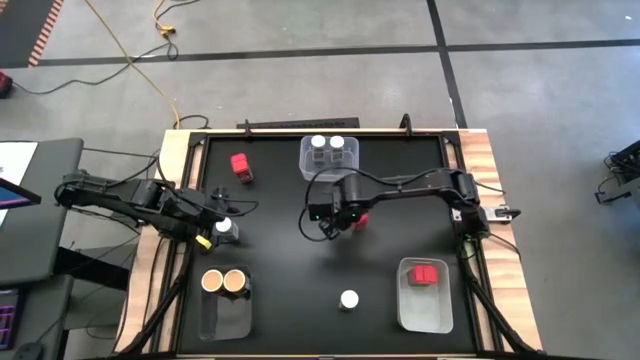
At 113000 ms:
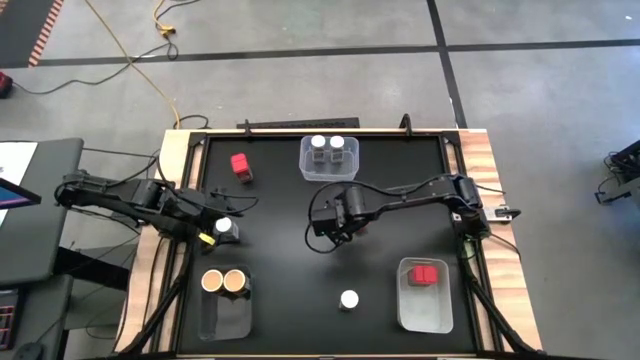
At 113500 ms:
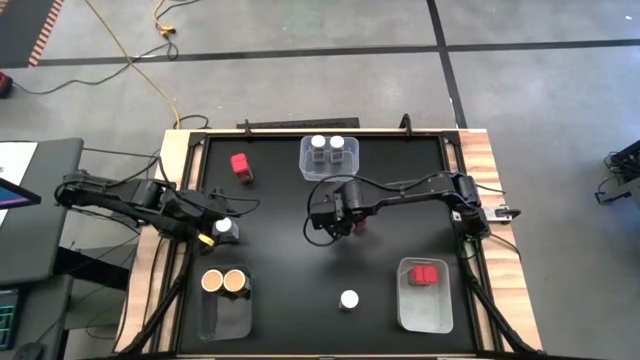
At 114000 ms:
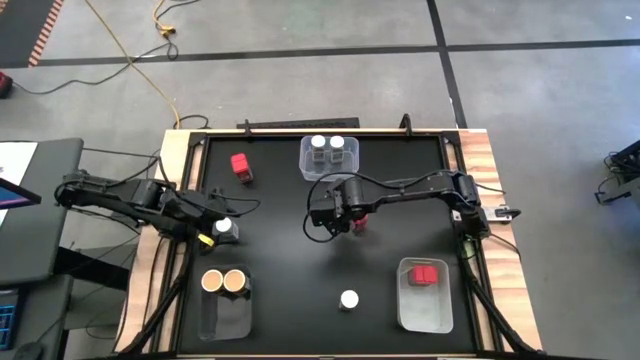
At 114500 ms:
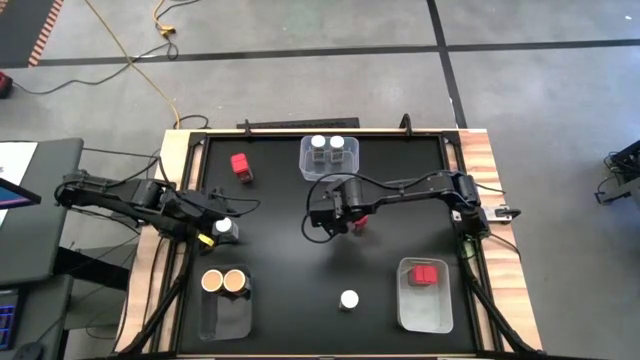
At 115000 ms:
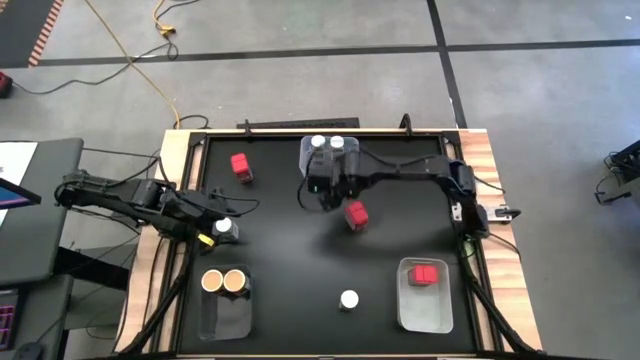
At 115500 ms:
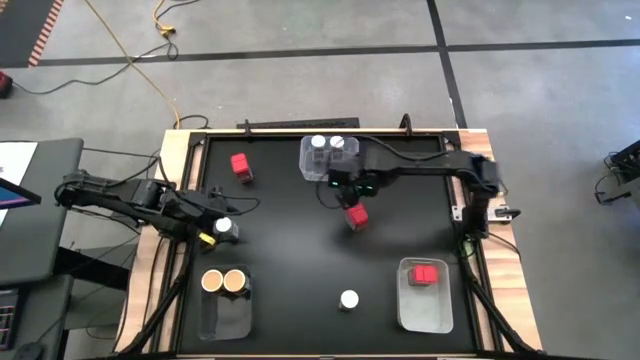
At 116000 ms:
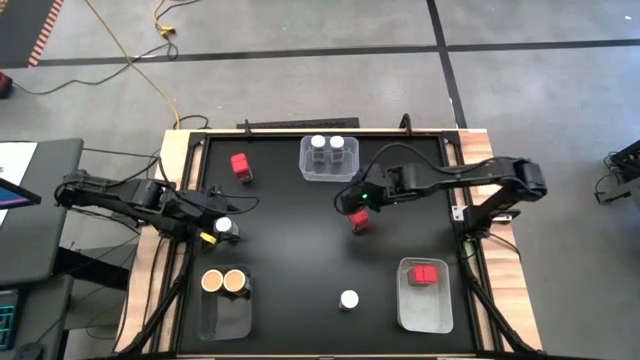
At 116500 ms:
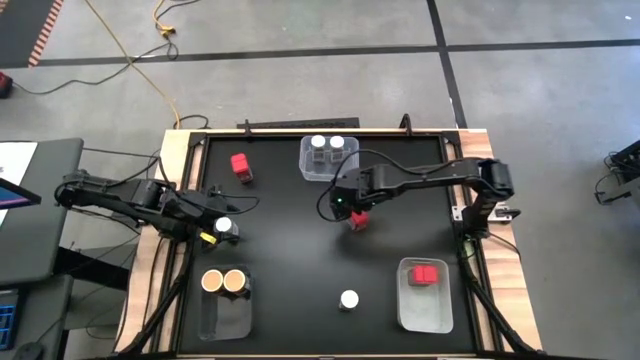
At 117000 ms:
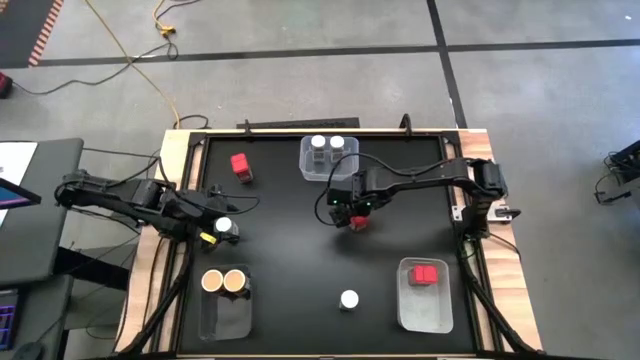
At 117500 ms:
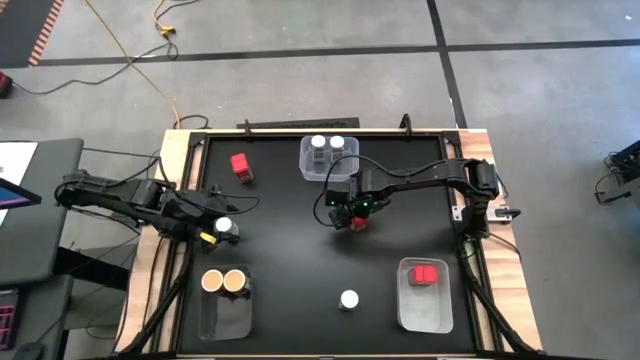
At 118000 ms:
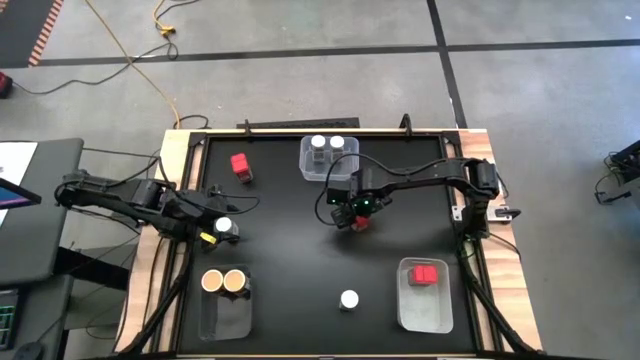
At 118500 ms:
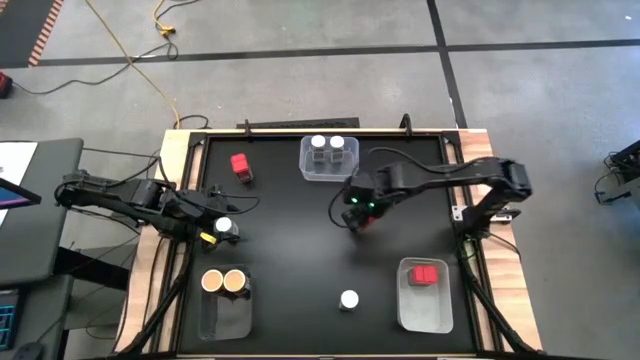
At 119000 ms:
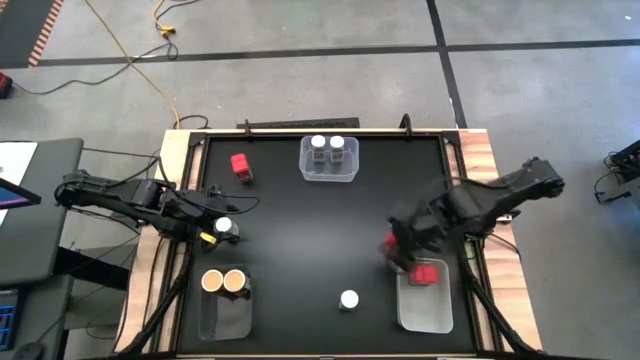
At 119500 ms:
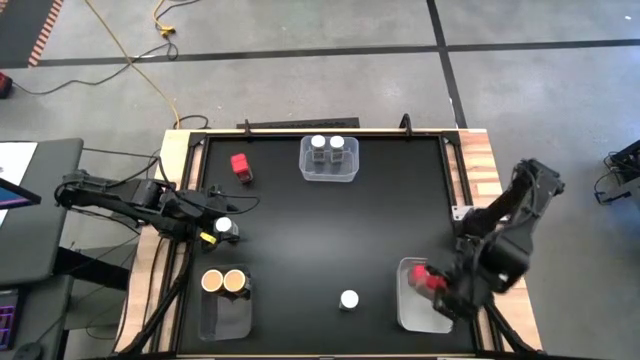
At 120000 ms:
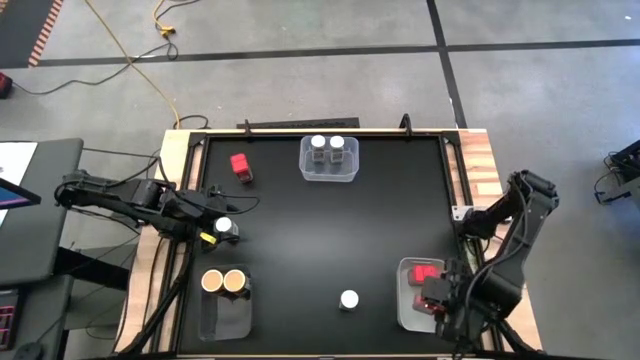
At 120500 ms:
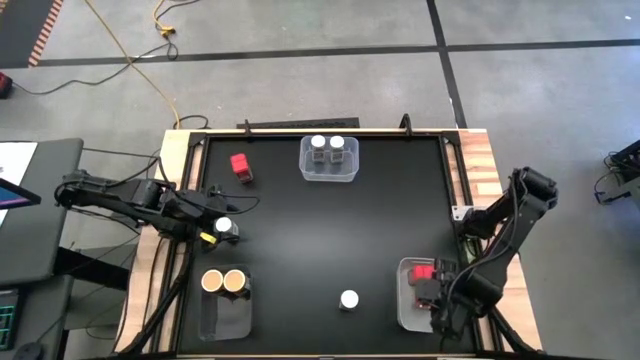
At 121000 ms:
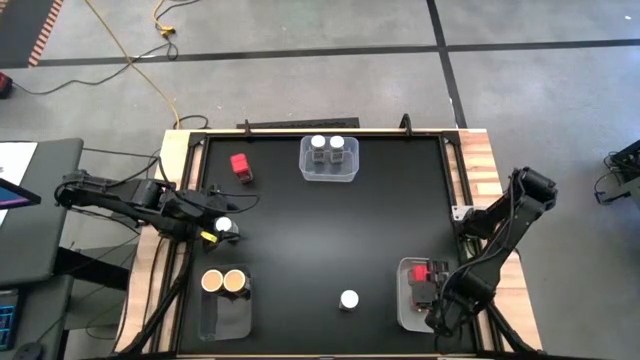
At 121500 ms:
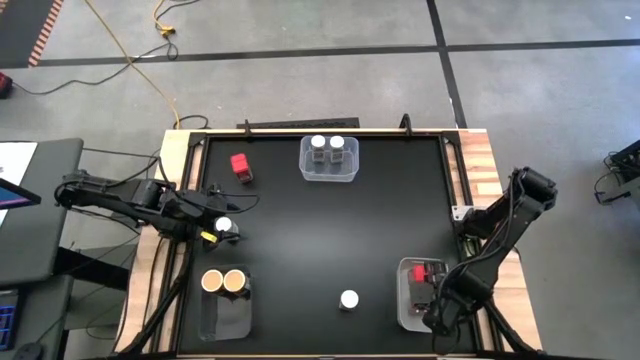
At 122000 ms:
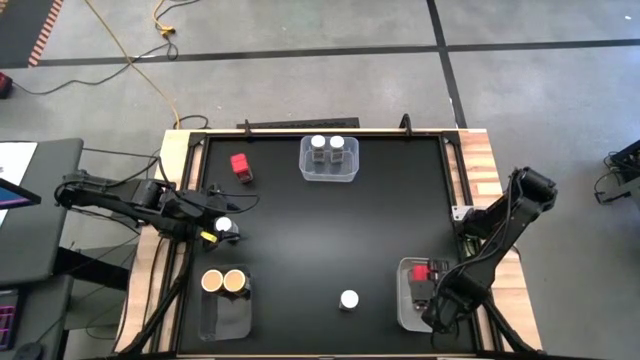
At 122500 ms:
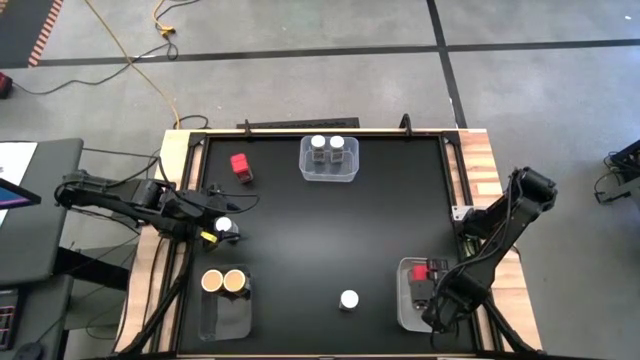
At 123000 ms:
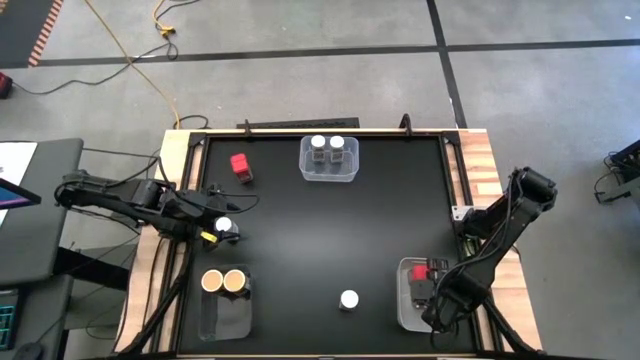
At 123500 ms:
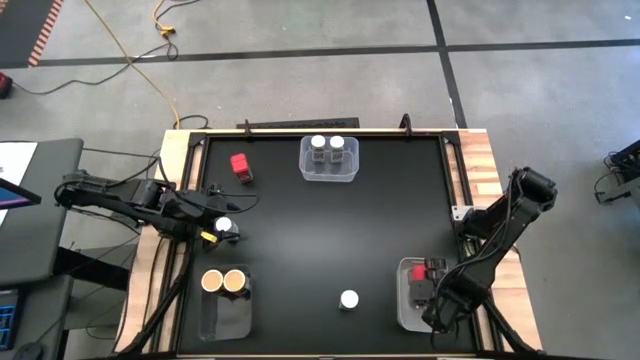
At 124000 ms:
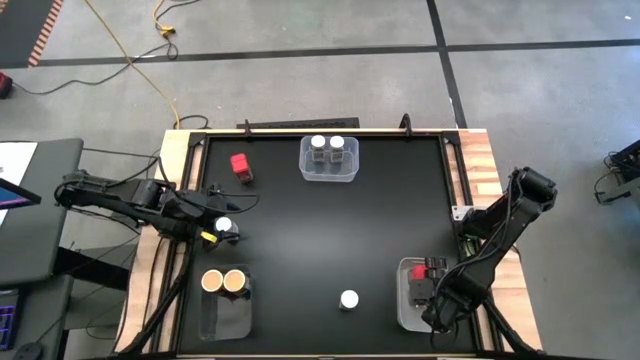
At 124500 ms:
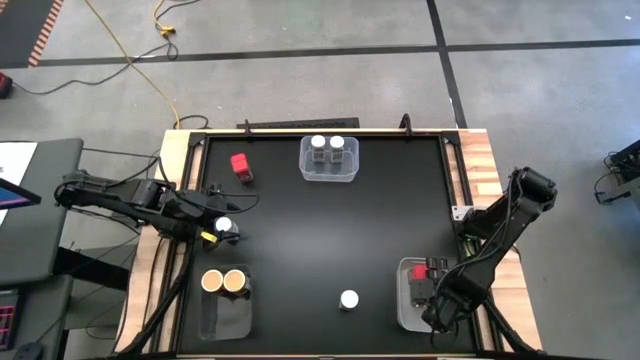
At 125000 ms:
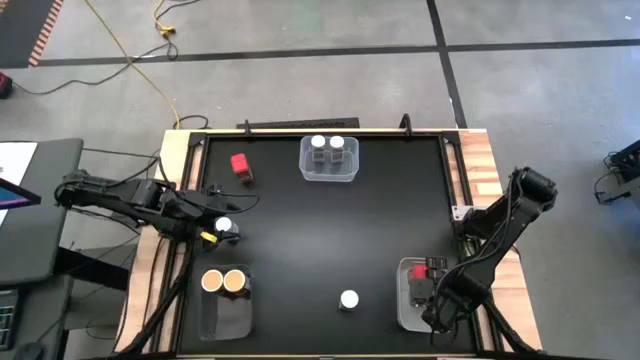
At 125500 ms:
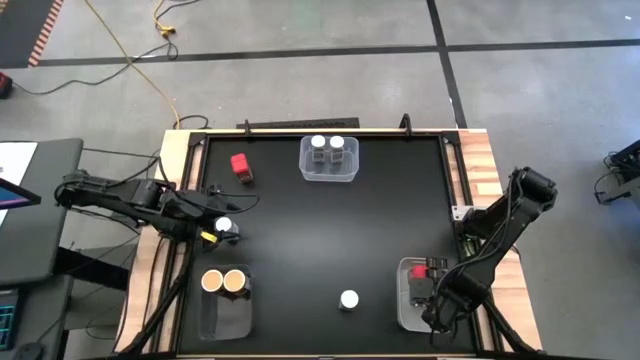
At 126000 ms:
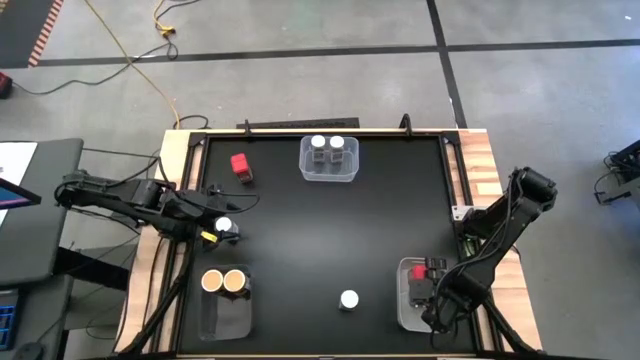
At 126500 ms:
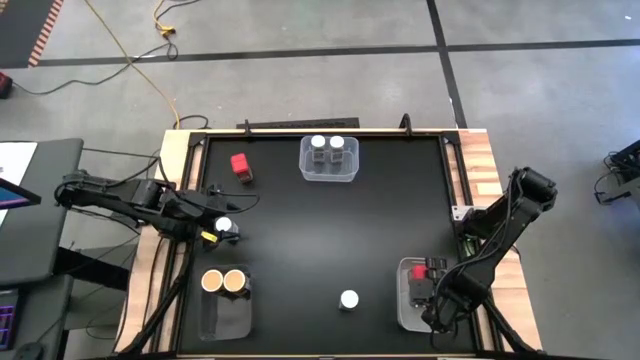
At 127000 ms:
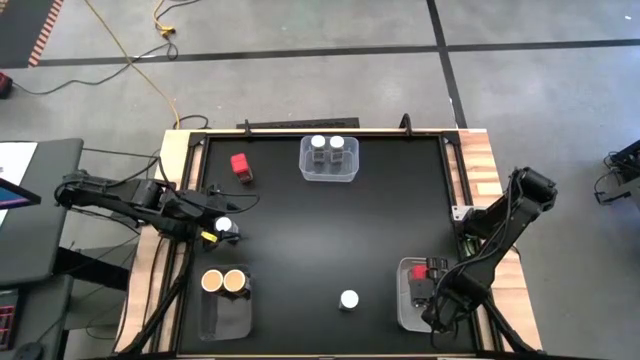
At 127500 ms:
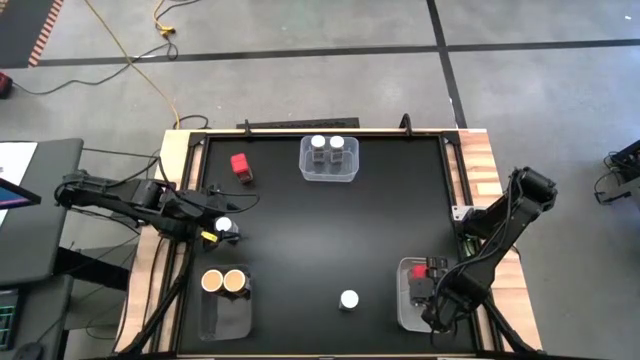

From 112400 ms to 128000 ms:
Task: Sort spices by type
Put the right red spice can into the white bin
